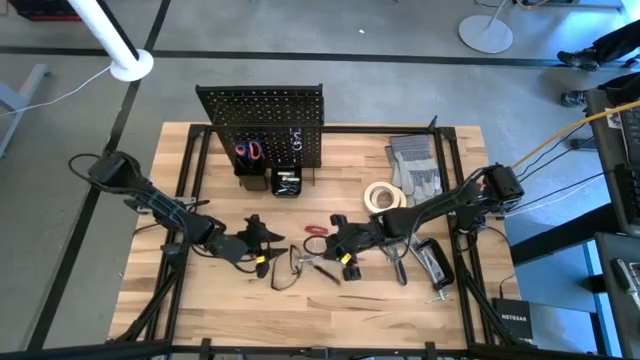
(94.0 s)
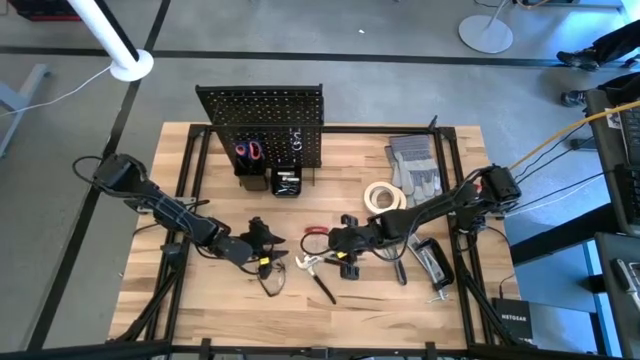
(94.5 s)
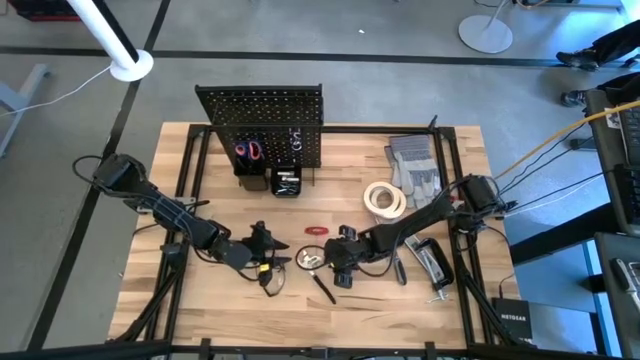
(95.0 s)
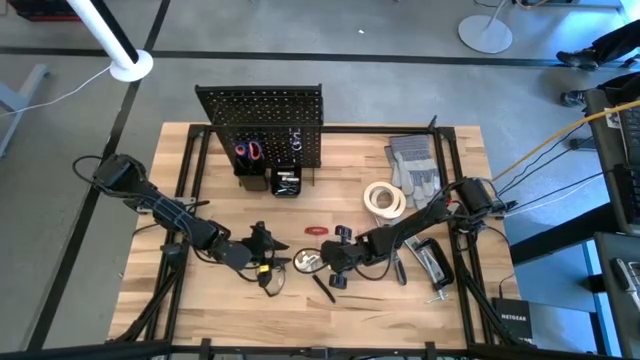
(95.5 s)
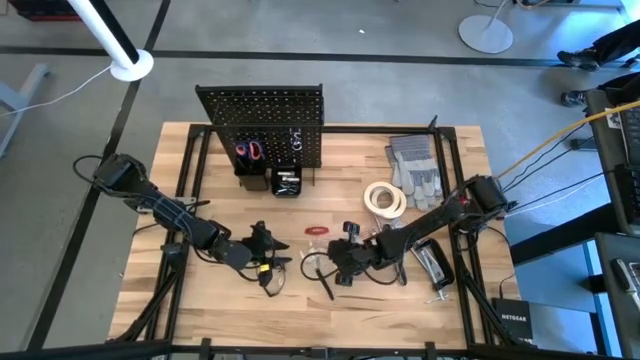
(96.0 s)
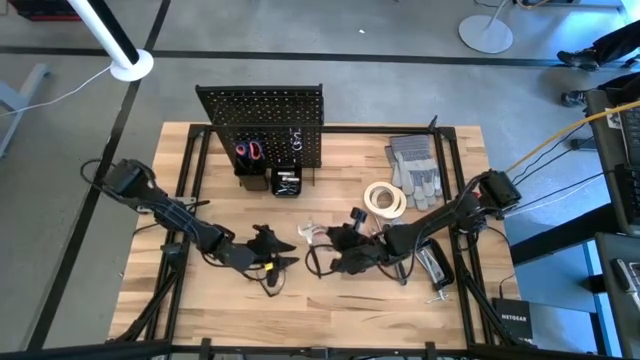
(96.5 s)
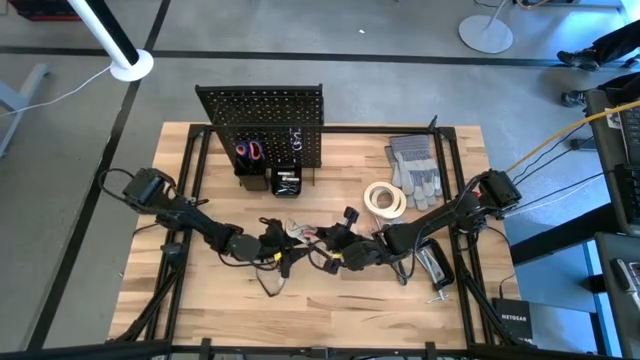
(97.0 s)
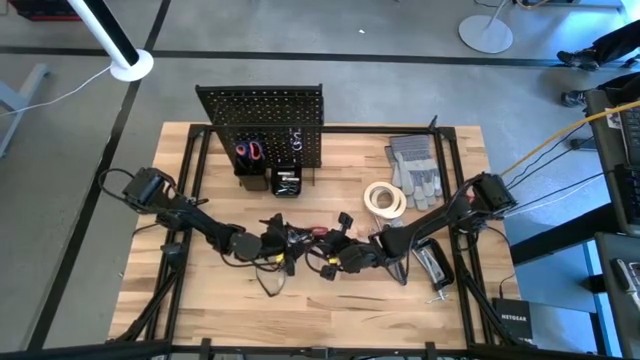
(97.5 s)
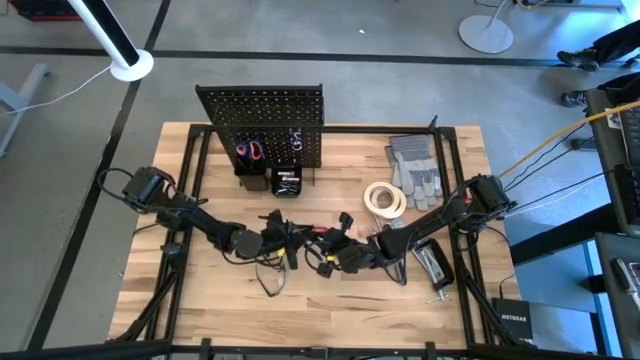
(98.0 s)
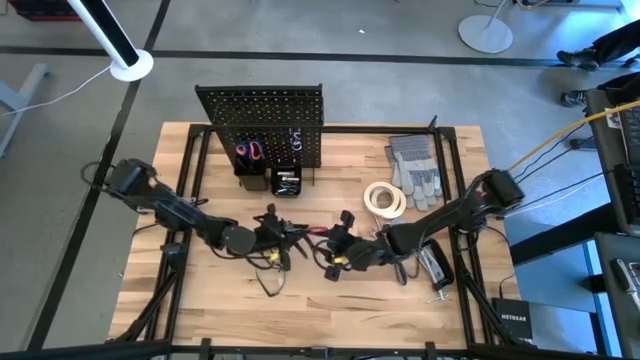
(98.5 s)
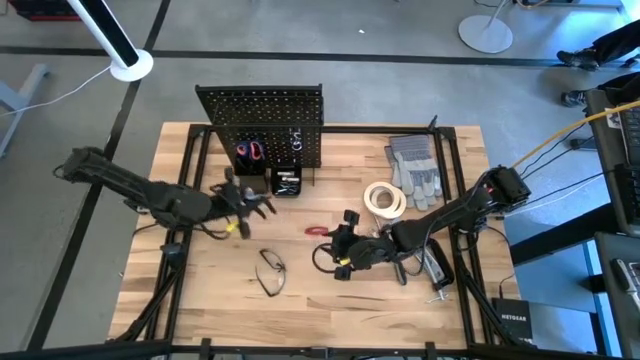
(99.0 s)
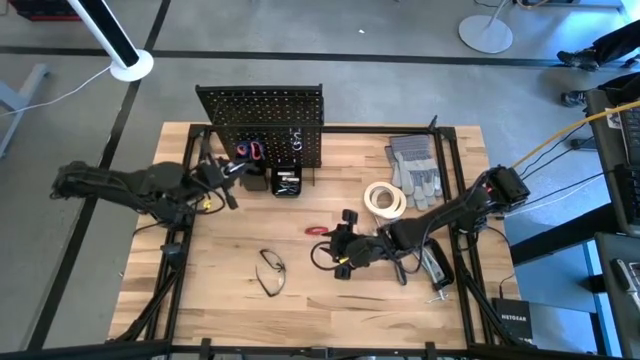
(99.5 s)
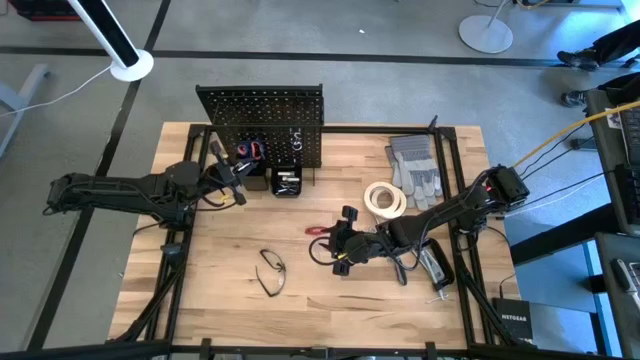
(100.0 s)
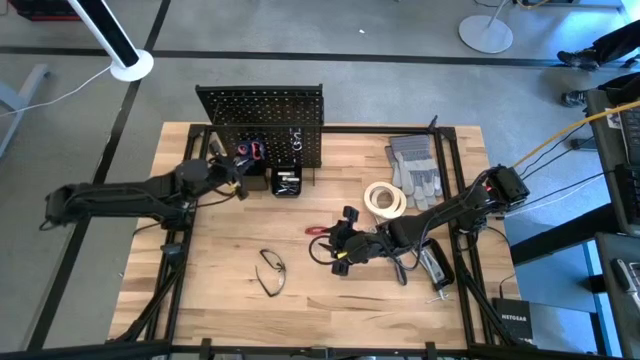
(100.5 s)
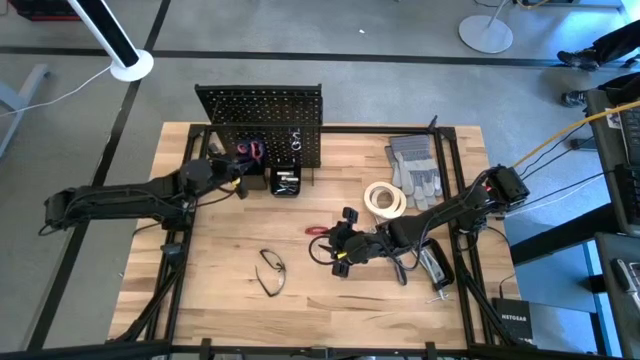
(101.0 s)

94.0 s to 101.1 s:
Task: Hang tools onto peg board
Put the pliers into the left pegboard organizer bin

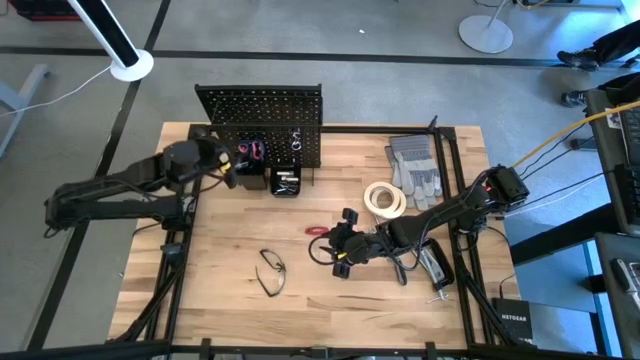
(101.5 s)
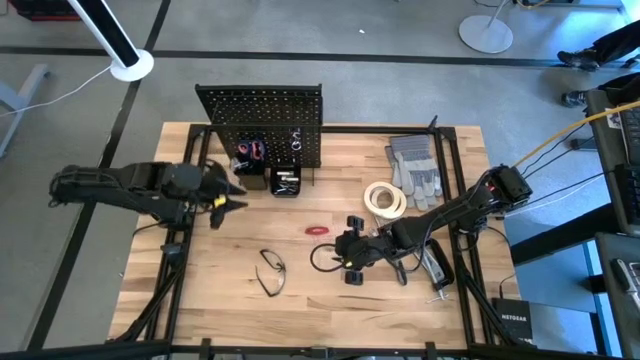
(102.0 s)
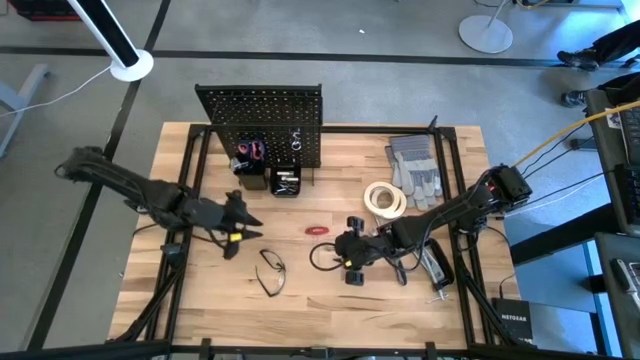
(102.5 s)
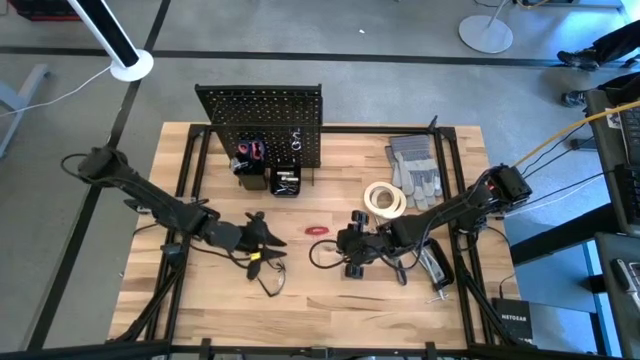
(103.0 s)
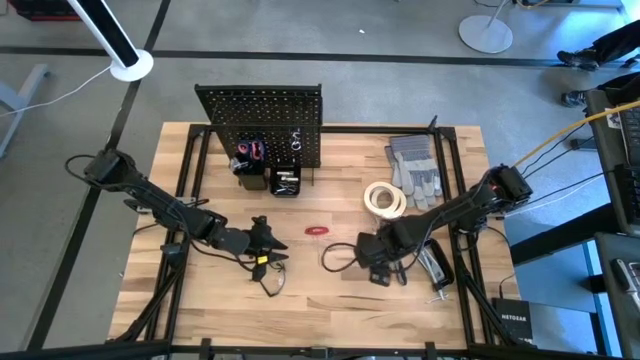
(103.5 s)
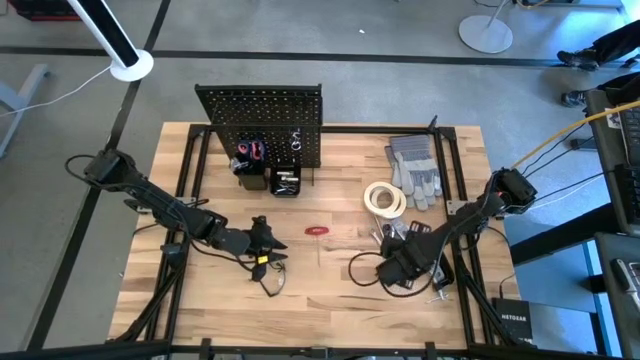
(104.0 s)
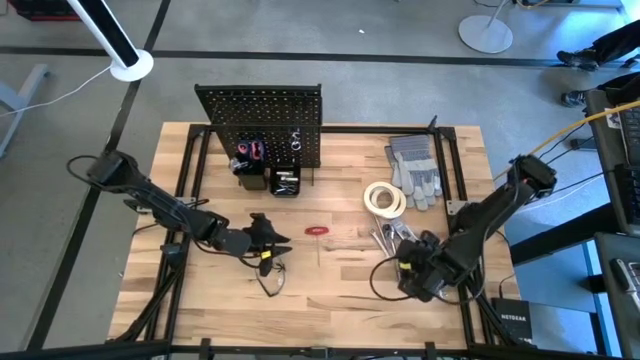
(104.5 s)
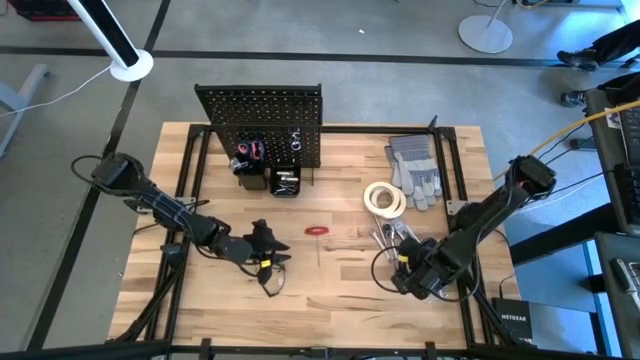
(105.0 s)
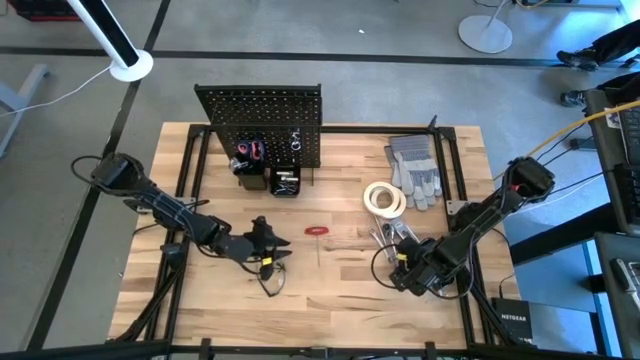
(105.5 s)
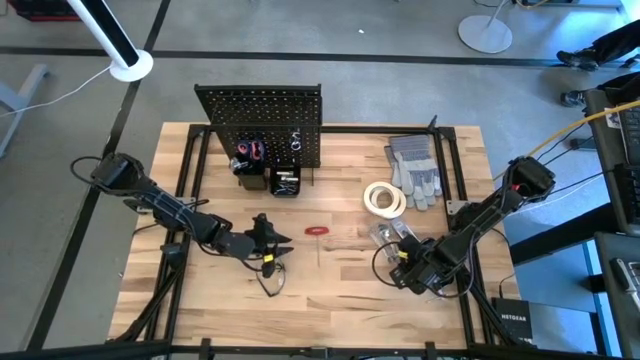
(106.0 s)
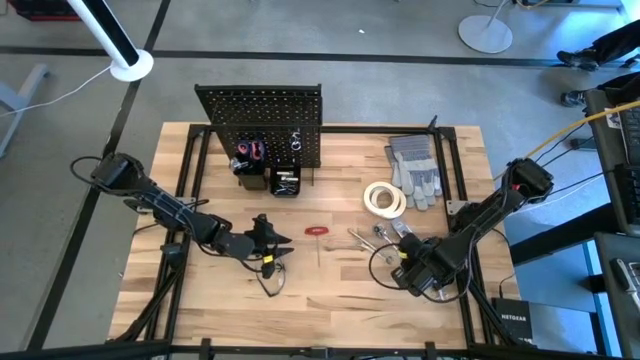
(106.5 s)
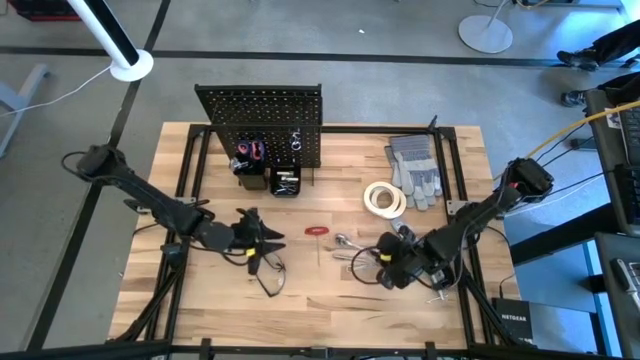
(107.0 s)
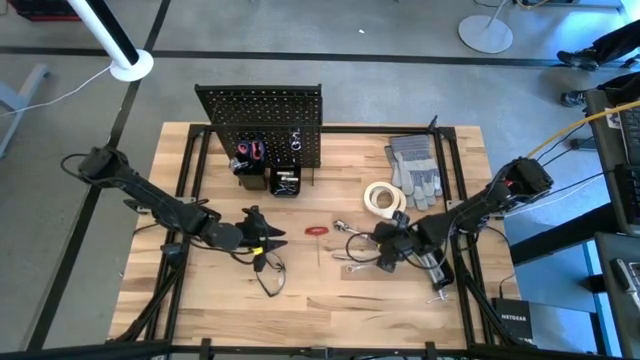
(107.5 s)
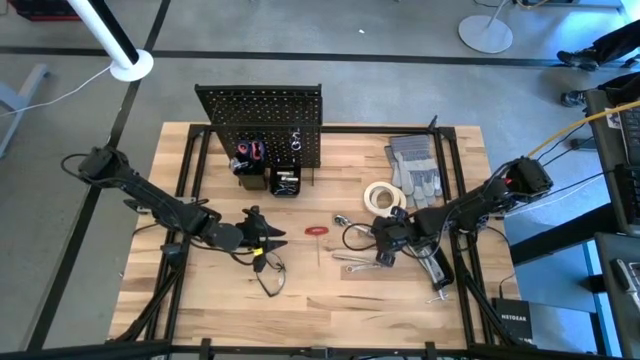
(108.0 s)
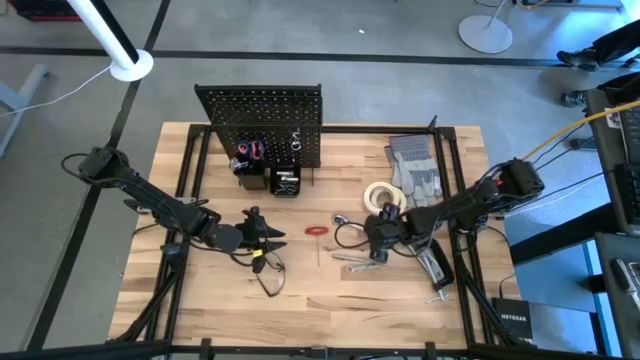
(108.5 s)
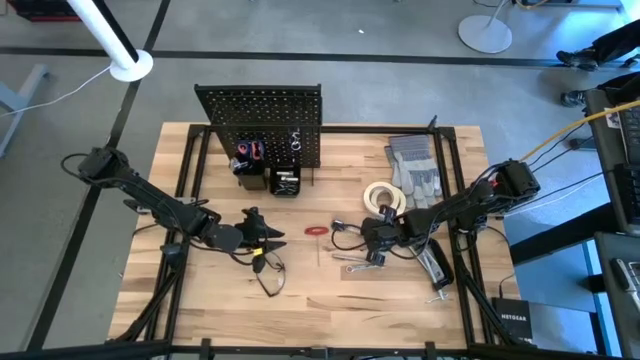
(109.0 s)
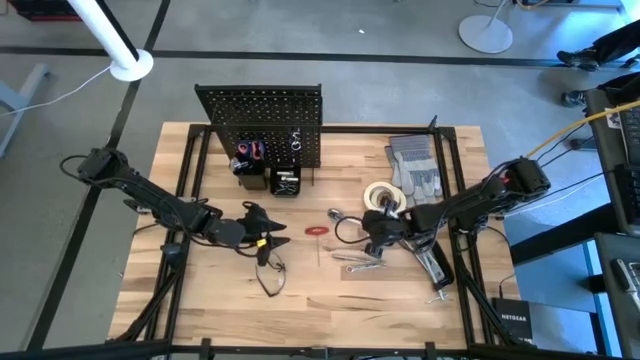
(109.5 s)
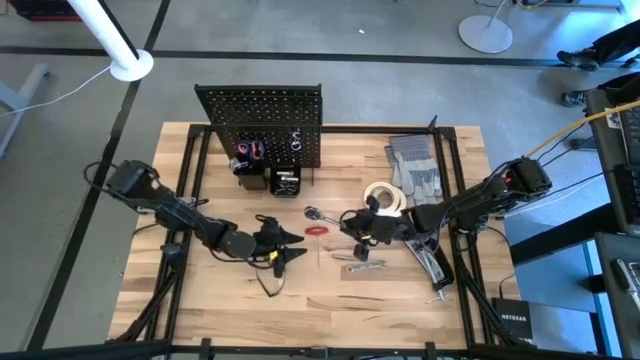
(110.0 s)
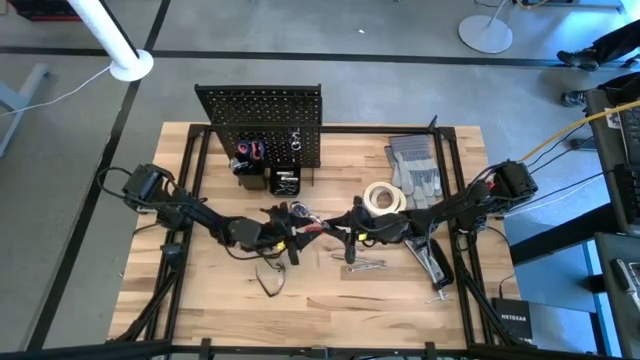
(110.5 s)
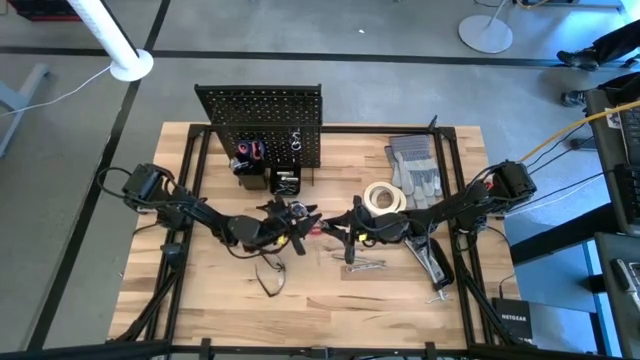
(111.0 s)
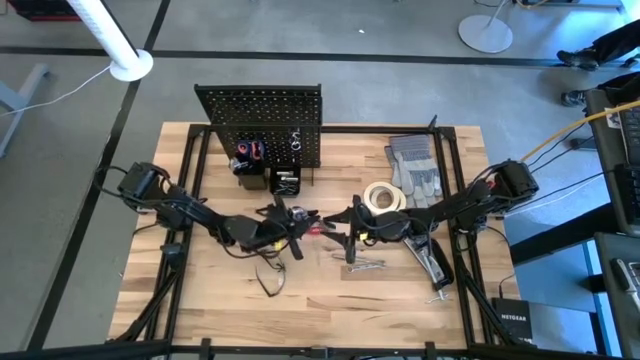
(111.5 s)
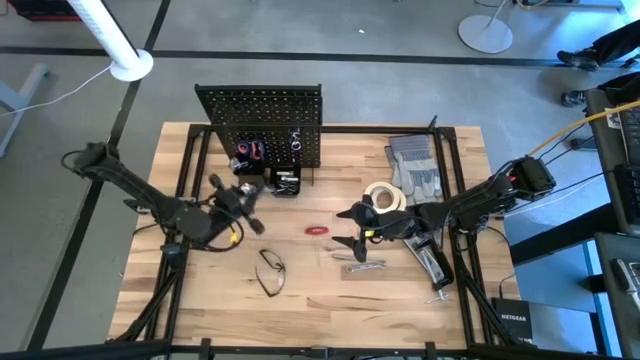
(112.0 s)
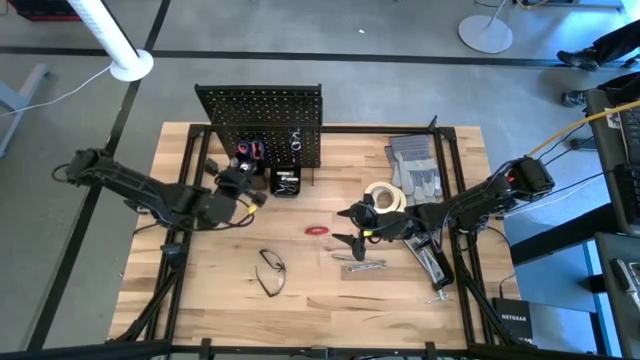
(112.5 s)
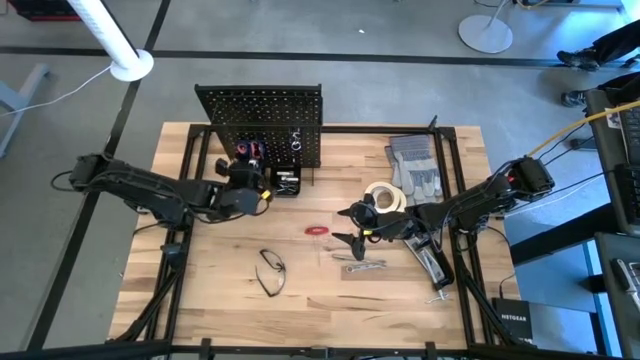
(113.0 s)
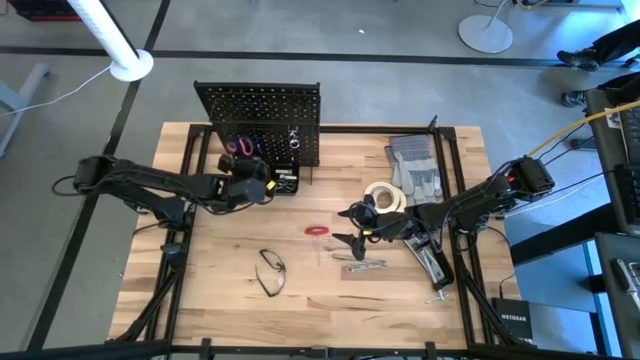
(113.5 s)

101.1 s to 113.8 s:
Put the ratchet wrench into the left pegboard organizer bin
